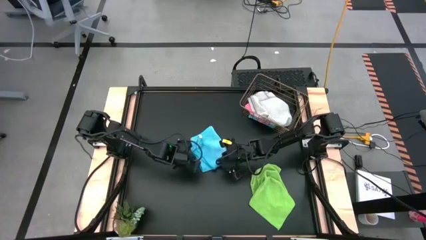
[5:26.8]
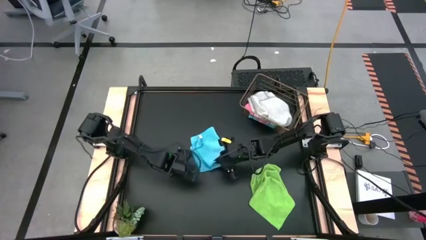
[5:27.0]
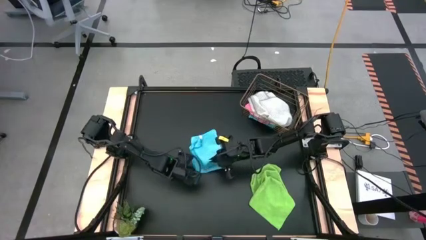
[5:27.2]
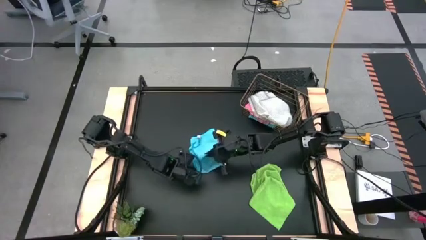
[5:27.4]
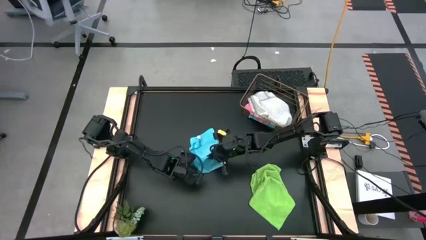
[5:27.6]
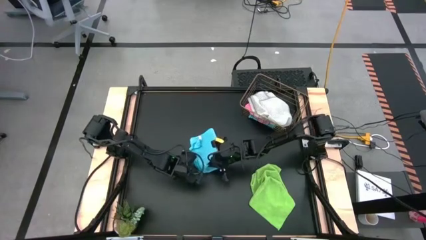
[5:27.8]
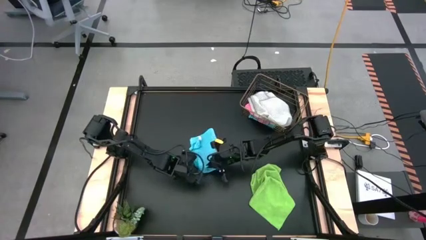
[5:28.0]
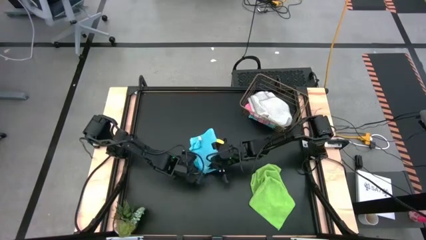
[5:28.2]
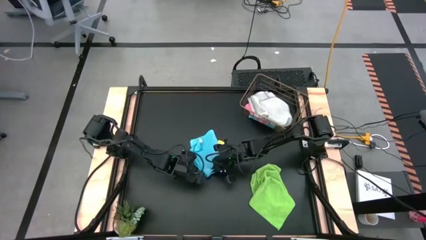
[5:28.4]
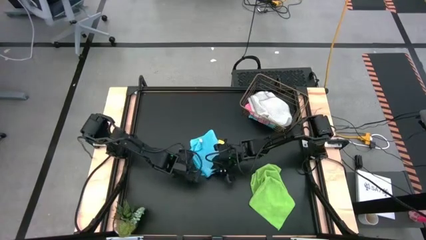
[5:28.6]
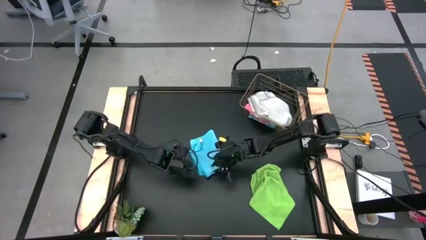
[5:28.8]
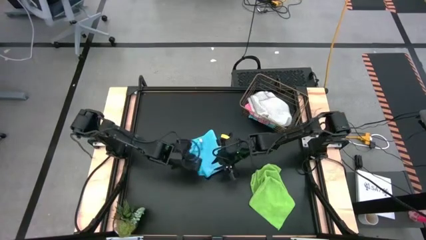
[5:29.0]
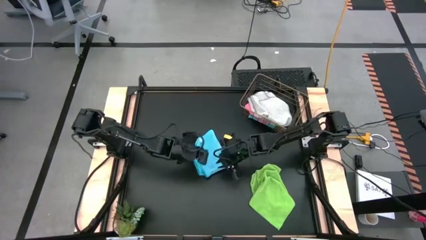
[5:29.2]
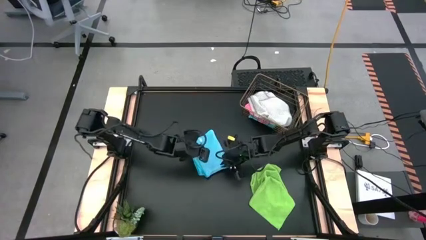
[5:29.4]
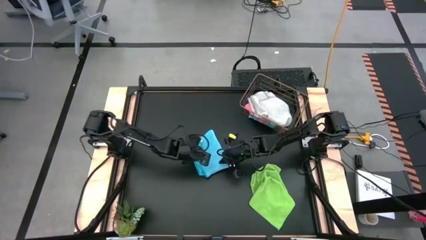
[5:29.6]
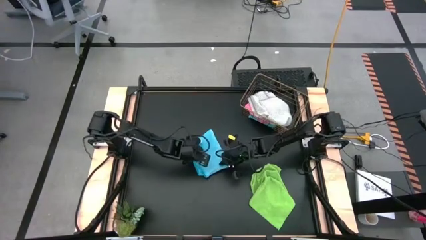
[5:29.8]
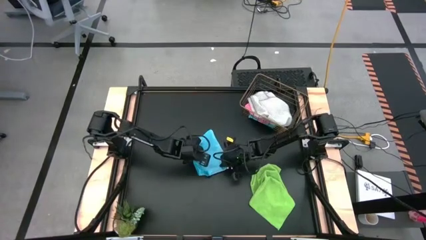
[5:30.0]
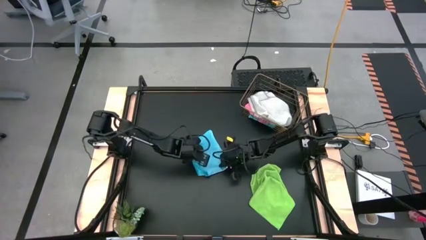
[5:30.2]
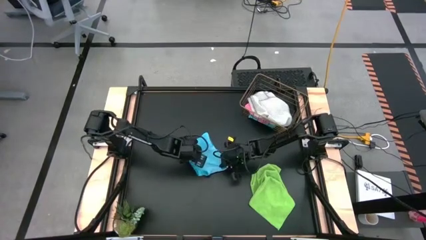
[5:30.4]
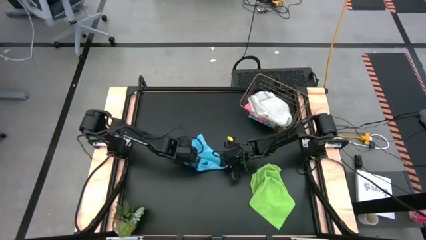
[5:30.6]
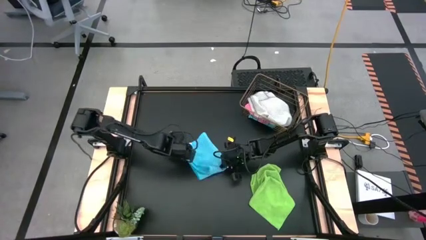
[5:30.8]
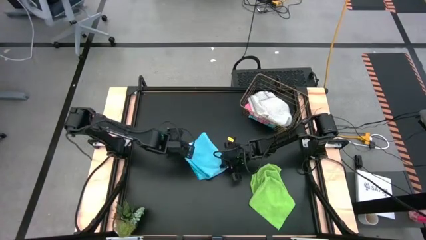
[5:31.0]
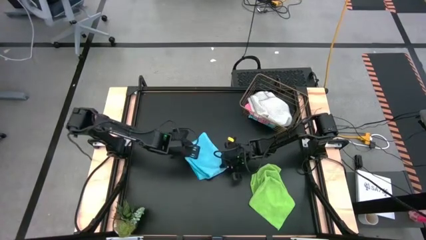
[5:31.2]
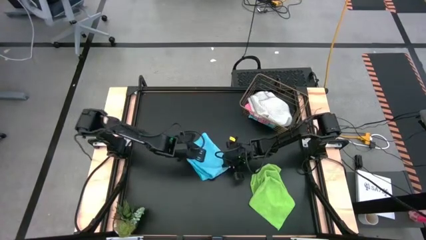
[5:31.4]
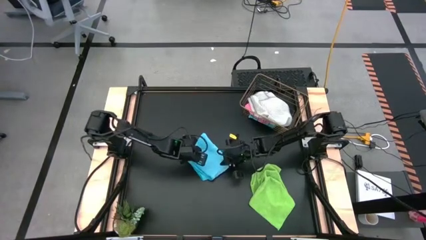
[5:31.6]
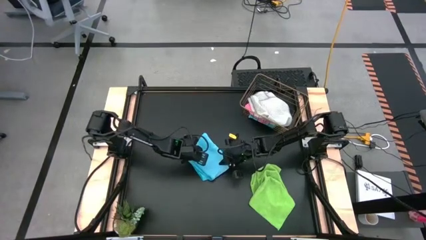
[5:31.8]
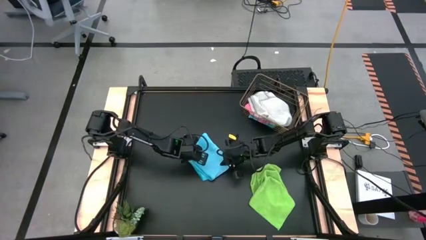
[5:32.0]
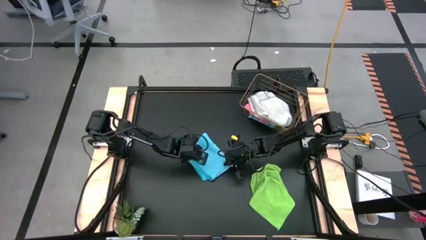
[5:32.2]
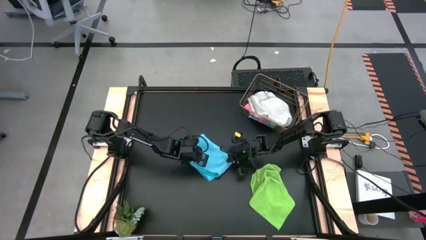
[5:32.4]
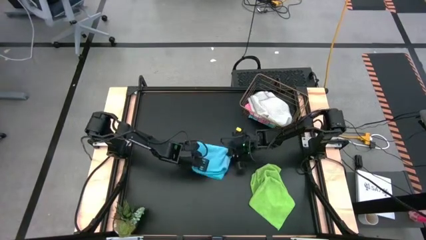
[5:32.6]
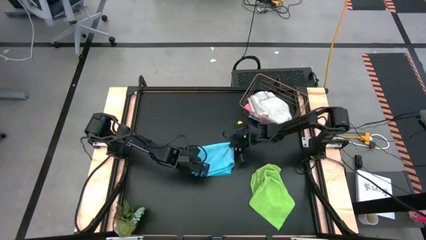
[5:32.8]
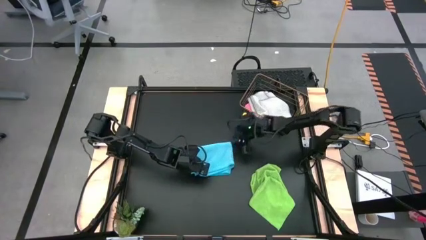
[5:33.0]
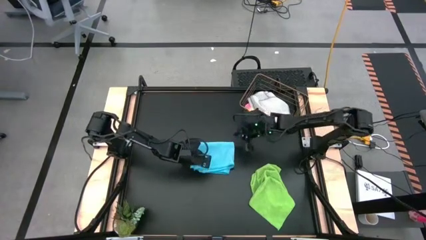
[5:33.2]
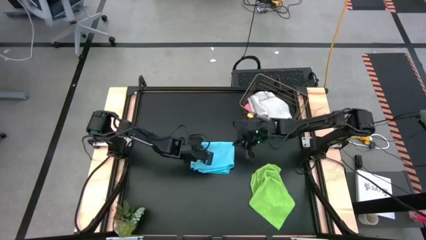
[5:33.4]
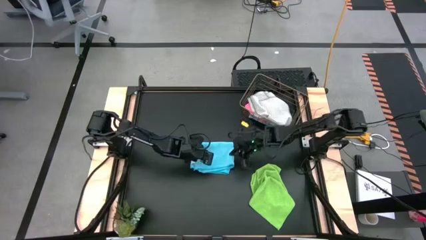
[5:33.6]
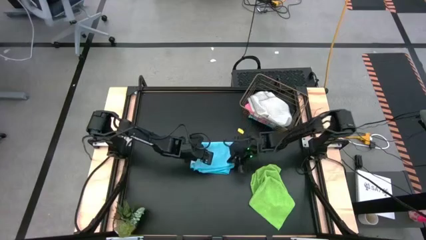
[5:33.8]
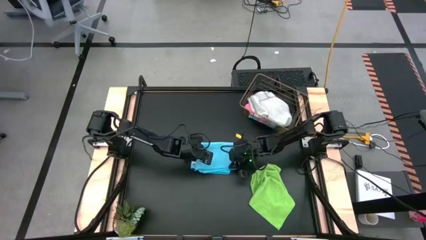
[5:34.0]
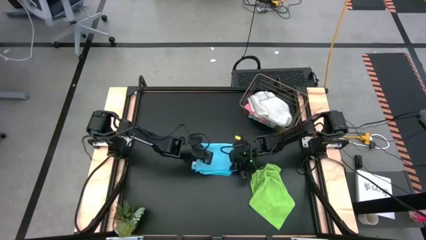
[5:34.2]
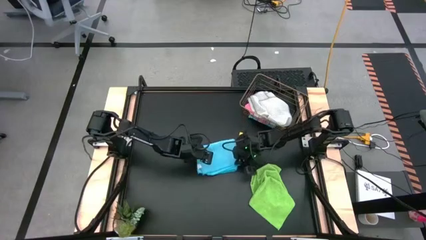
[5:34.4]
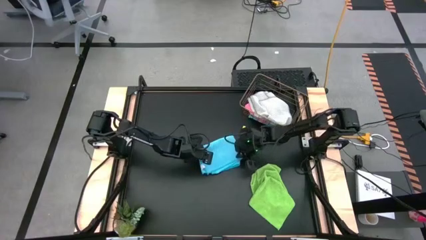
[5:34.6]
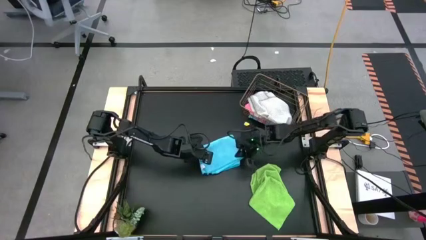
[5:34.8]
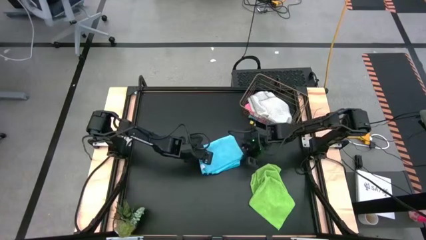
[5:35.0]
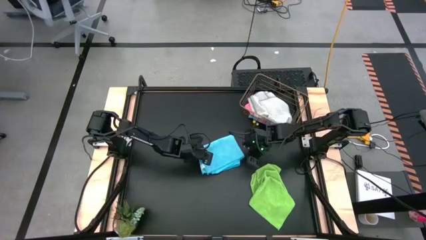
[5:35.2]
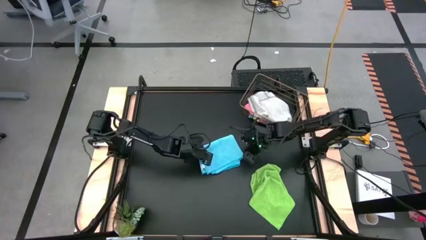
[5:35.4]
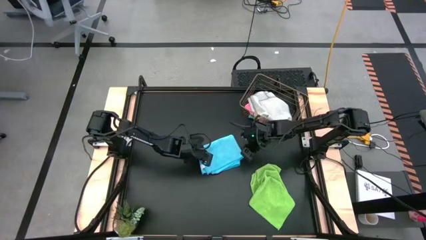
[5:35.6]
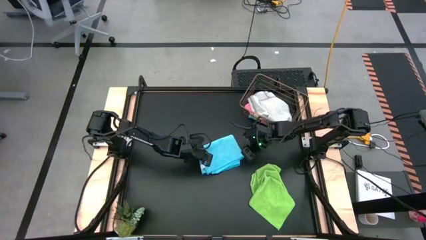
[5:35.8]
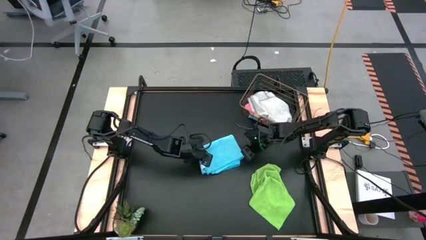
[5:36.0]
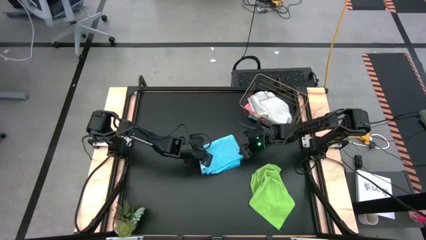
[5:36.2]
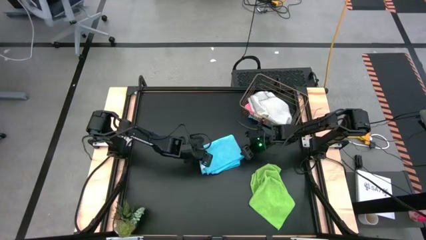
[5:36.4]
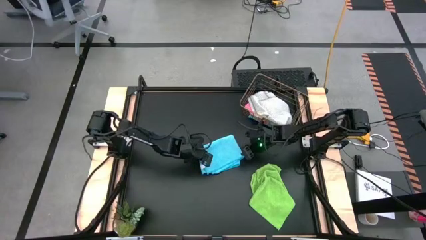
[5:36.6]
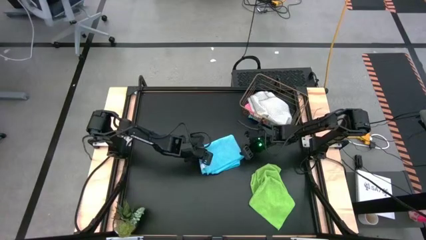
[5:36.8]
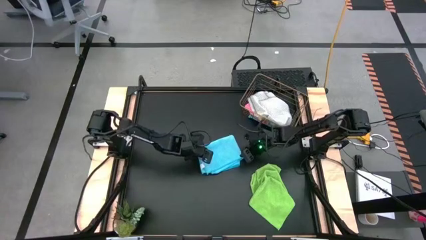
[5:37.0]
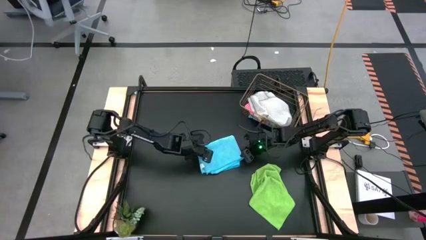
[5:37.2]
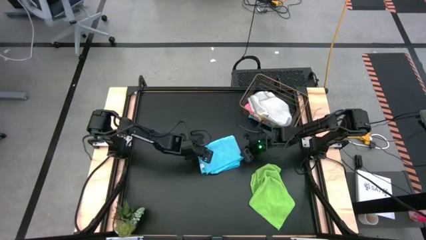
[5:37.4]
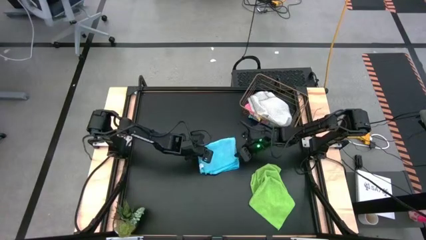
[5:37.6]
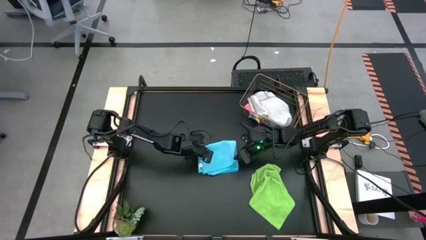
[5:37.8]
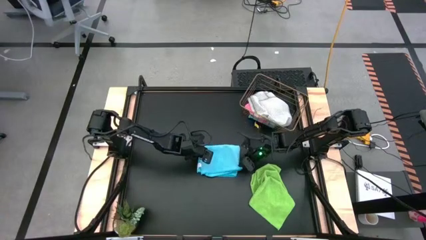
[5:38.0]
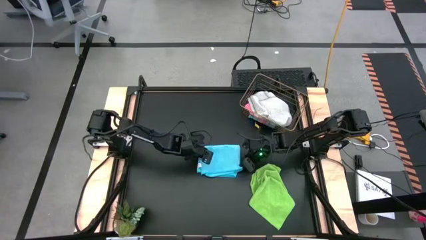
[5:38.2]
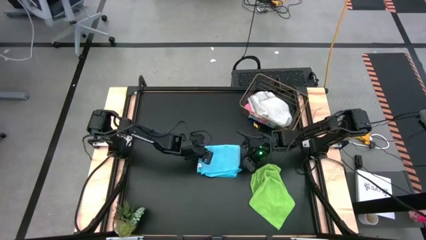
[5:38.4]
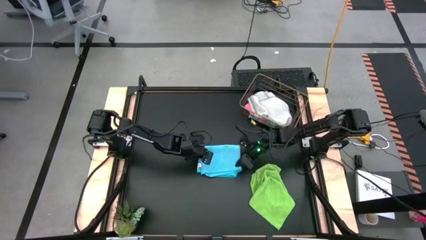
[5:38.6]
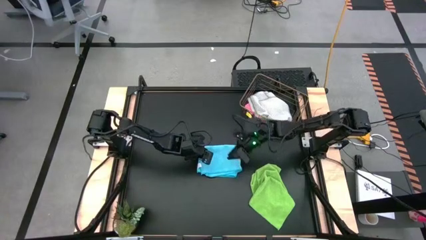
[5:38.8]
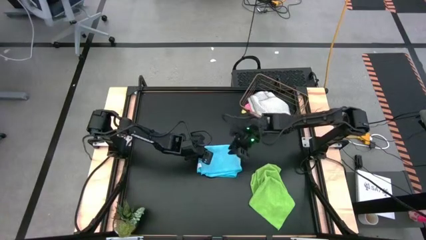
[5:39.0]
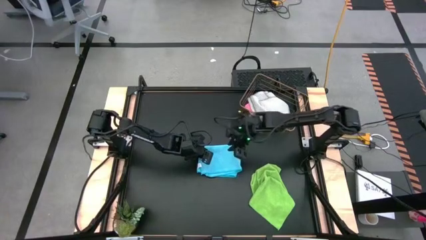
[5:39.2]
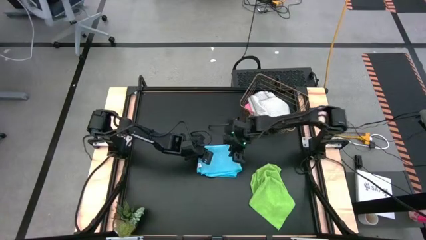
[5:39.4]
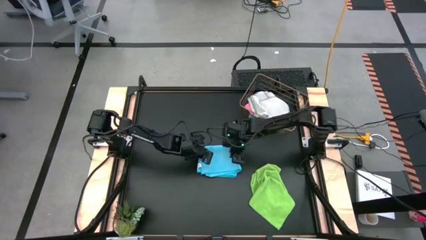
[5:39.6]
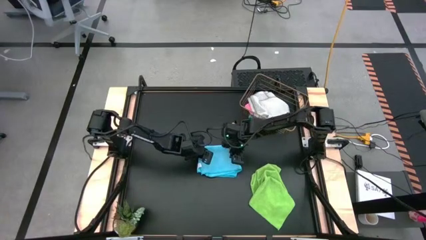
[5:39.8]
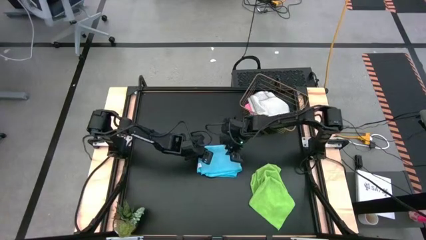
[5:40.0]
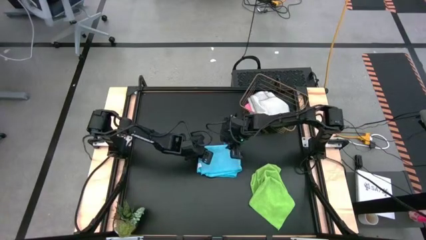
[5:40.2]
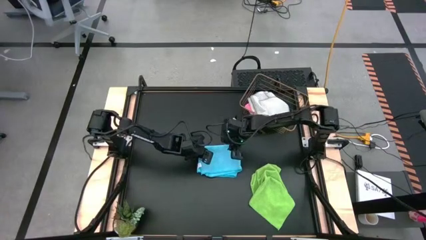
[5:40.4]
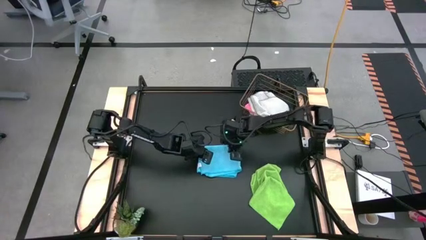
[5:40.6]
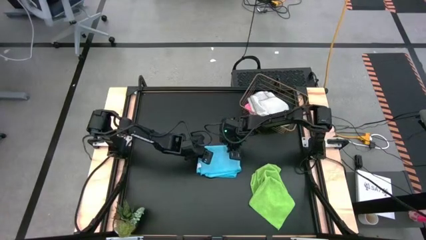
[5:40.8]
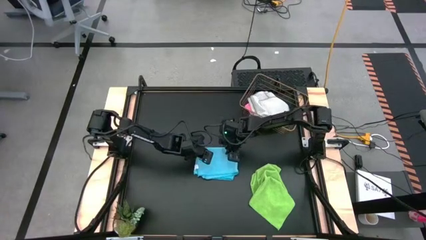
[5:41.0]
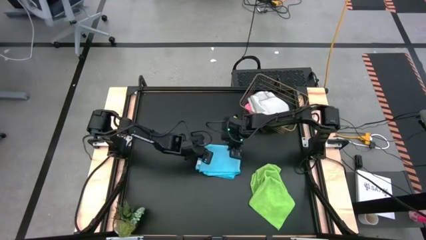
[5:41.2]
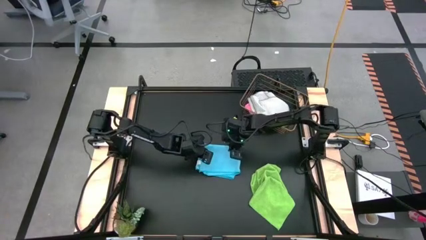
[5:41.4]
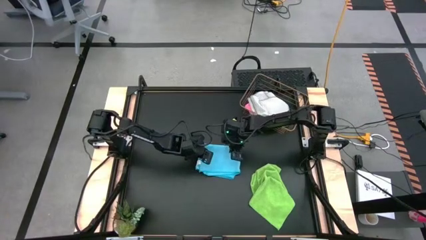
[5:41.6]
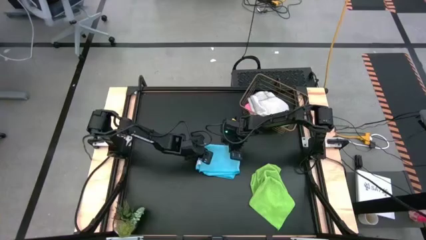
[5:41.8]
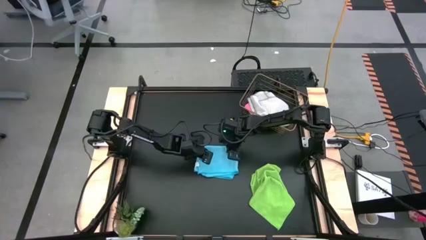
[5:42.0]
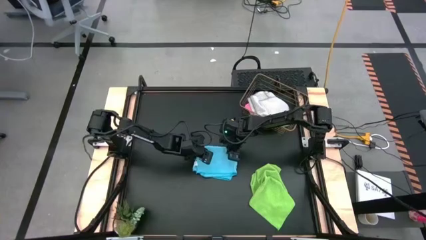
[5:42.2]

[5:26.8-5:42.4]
Task: Fold microfiber towels
Fold the blue towel

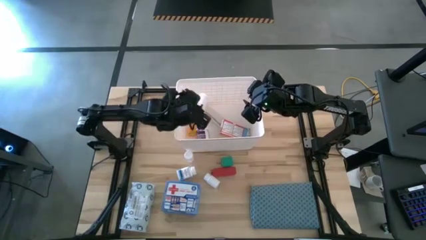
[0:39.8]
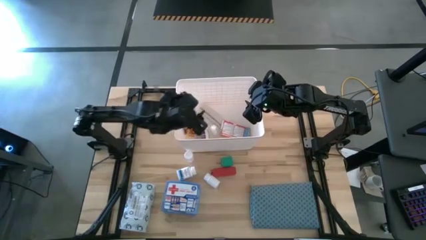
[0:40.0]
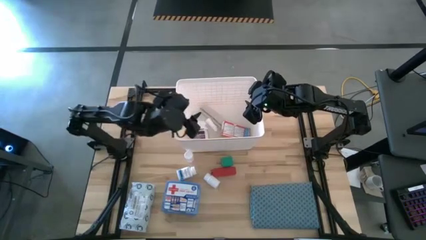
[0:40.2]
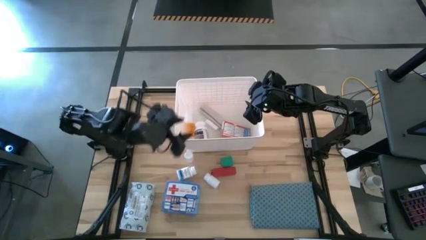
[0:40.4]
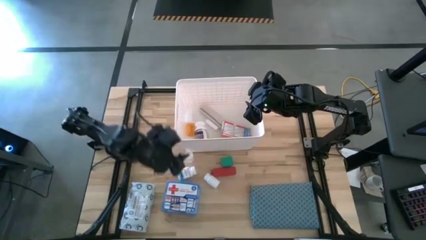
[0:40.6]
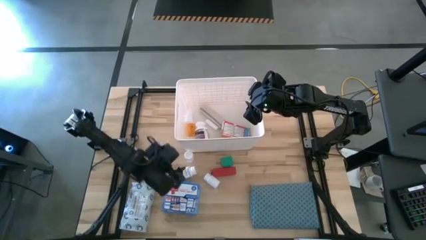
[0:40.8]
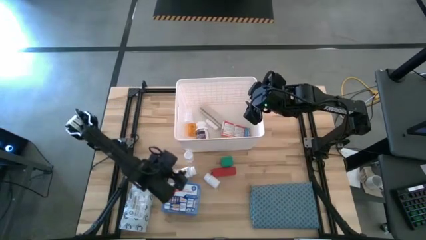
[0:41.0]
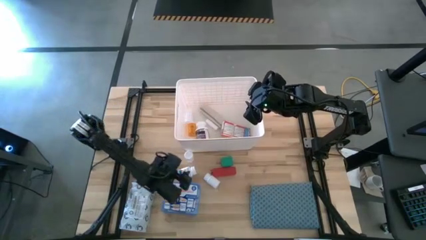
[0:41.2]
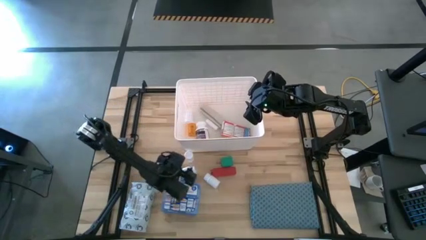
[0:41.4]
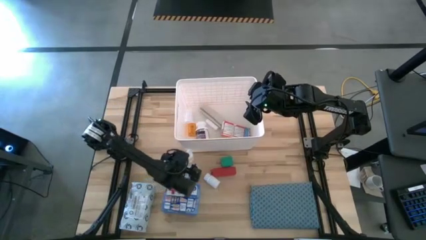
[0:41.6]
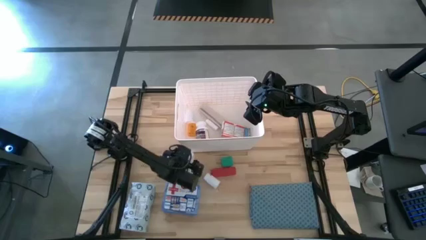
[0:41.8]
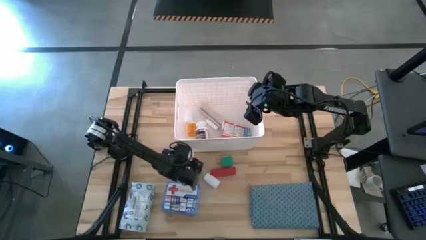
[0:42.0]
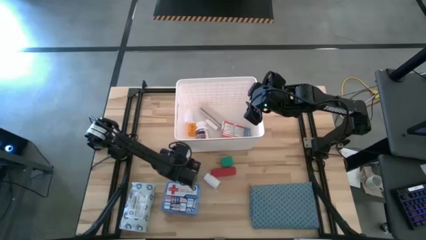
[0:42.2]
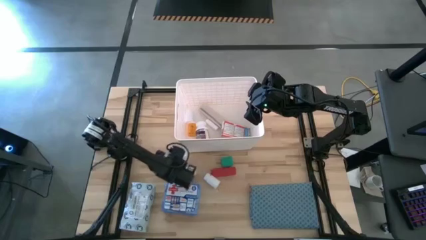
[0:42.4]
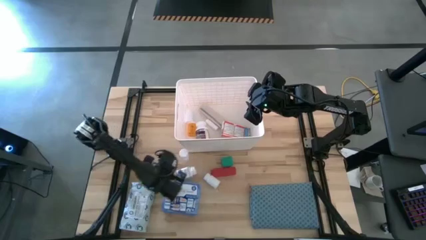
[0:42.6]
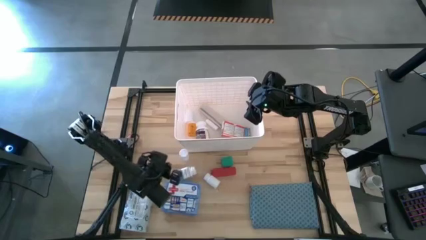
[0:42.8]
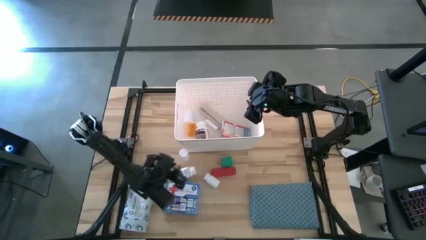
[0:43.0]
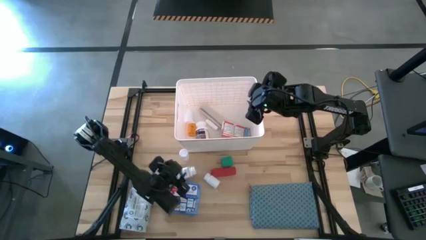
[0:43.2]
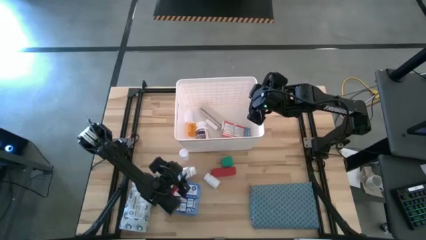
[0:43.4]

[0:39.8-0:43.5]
Task: Pick & place medical supplies in basket/bin
Put the top white medicine bottle into the white bin
